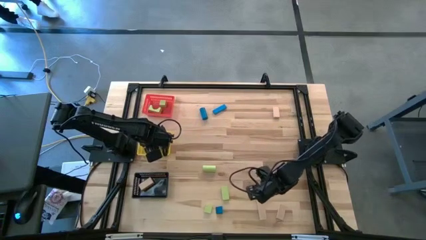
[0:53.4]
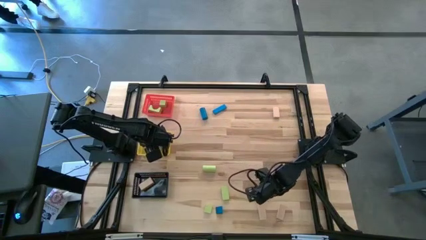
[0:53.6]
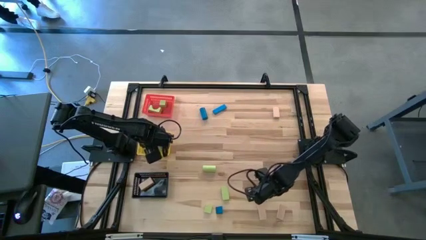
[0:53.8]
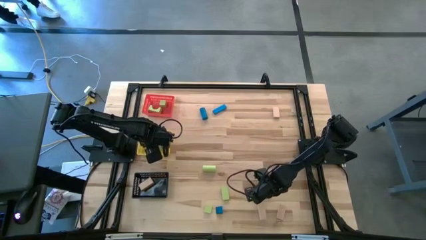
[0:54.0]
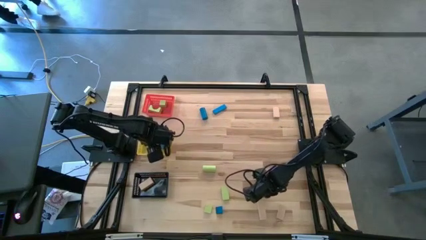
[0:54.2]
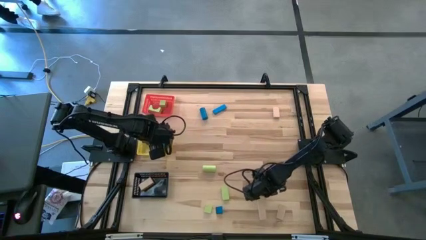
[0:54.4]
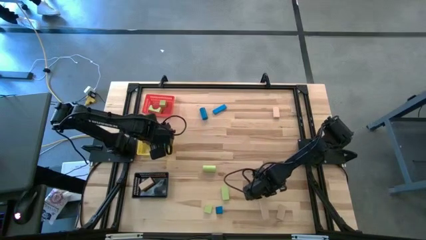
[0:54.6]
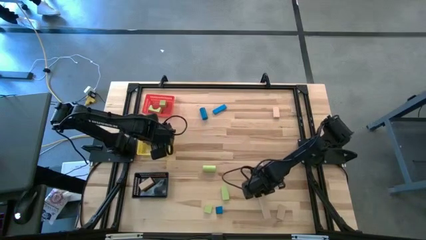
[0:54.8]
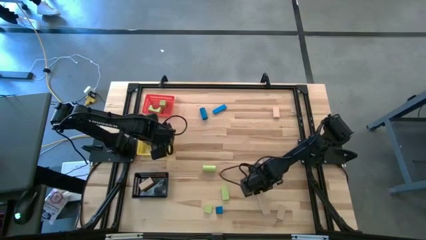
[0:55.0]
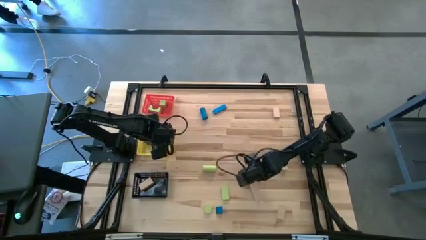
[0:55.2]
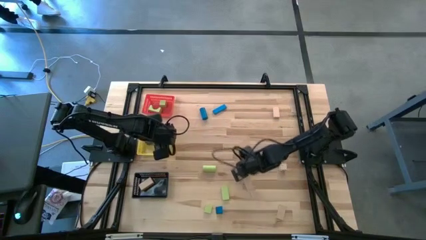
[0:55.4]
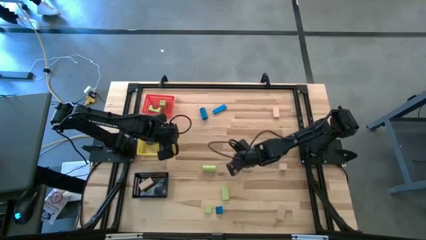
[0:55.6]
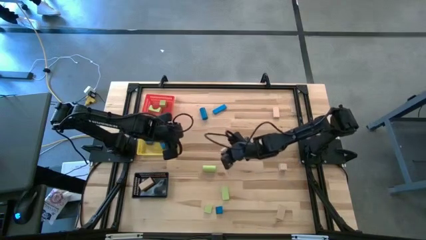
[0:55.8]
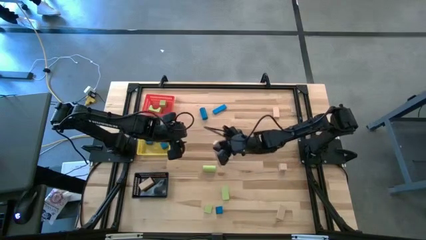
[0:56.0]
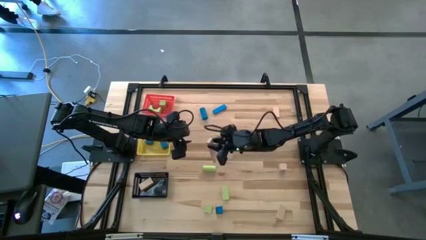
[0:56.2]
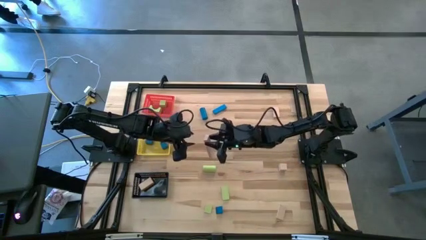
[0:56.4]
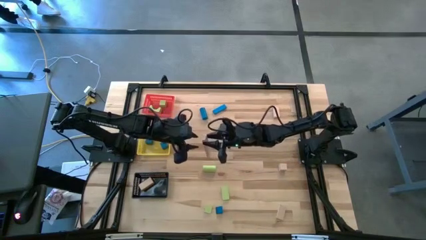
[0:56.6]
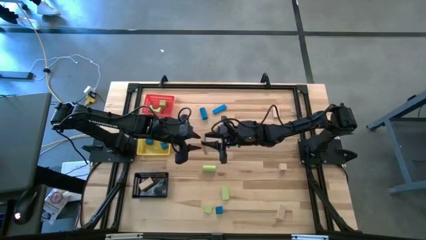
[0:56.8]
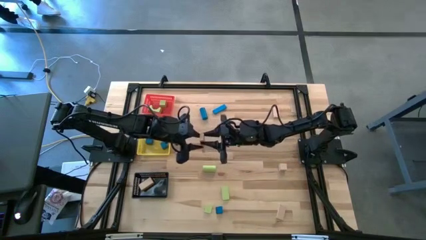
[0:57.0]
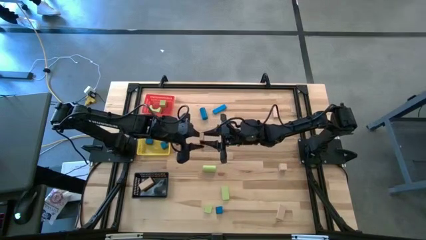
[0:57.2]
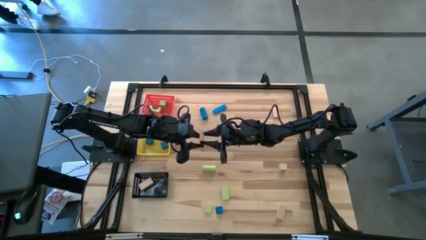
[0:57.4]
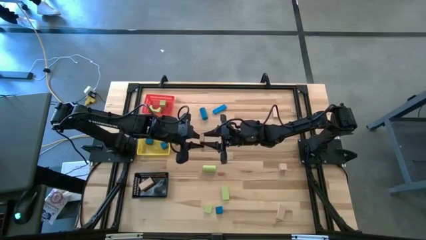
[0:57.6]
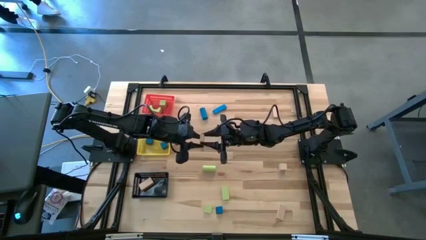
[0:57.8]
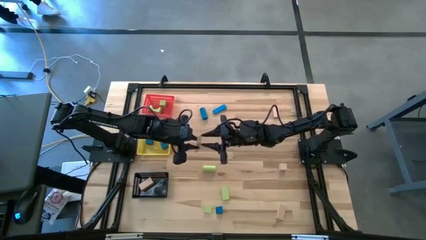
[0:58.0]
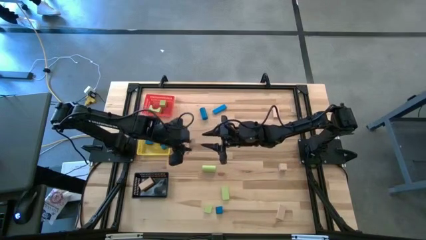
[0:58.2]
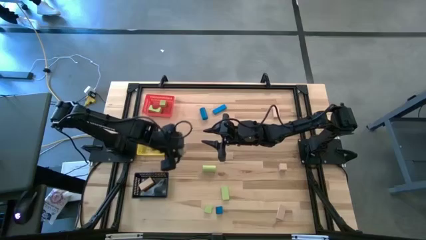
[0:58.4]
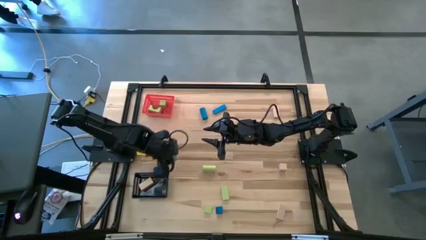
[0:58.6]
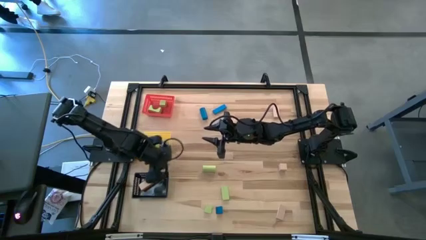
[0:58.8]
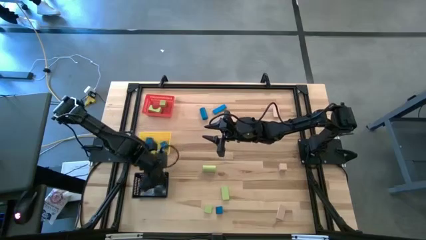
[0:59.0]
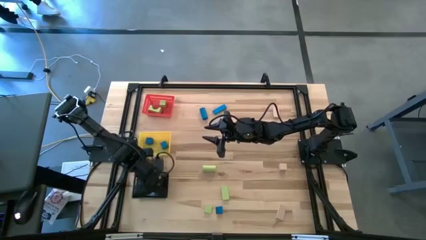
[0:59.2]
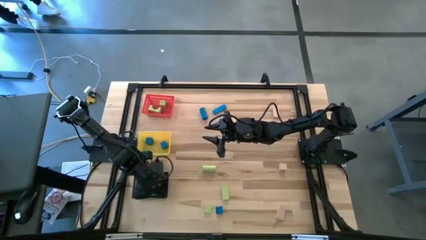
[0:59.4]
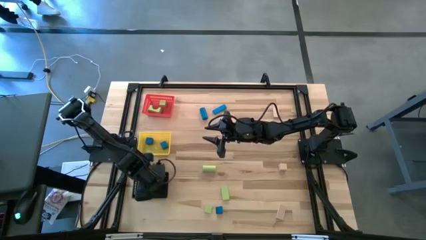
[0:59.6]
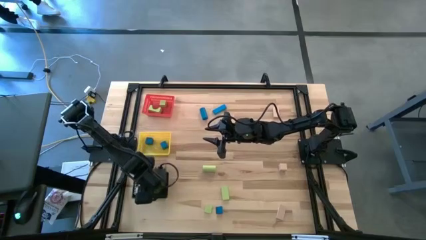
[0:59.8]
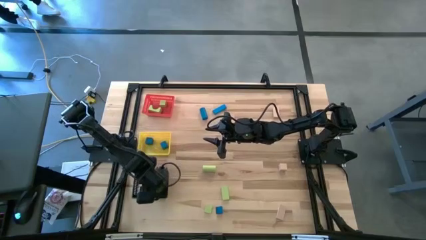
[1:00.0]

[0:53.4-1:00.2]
Task: Sort & place blocks by color
Put the big rectangular wooden block into the black basket

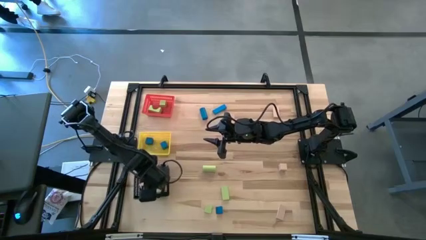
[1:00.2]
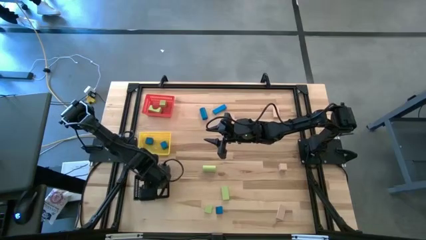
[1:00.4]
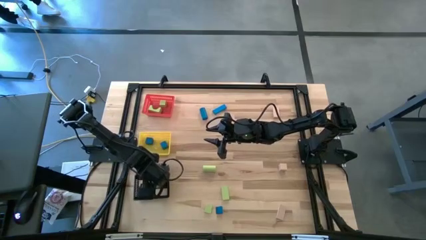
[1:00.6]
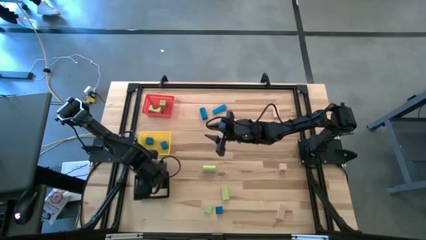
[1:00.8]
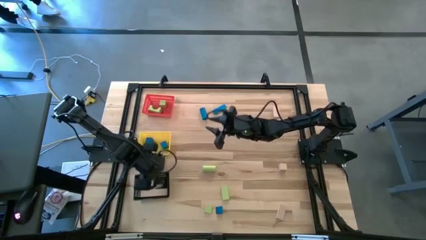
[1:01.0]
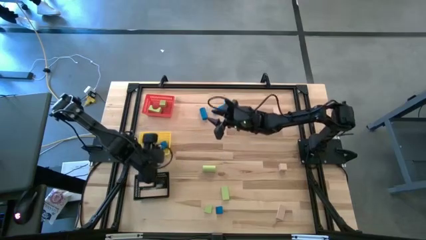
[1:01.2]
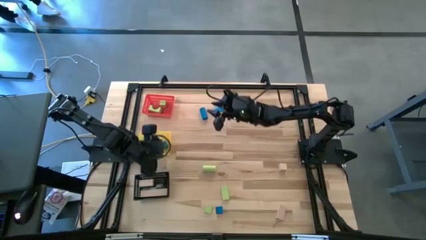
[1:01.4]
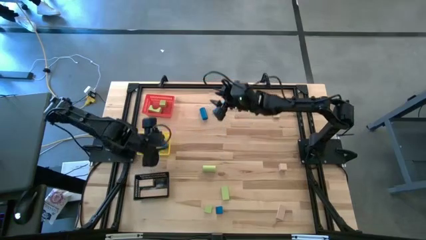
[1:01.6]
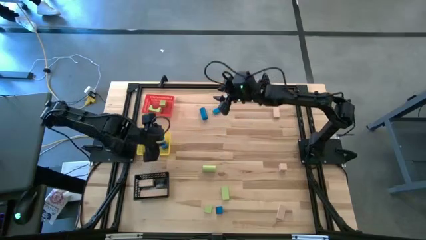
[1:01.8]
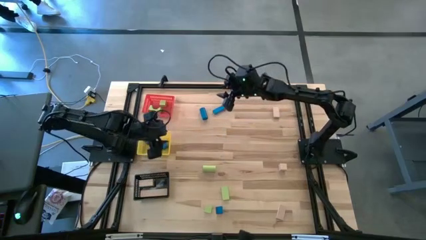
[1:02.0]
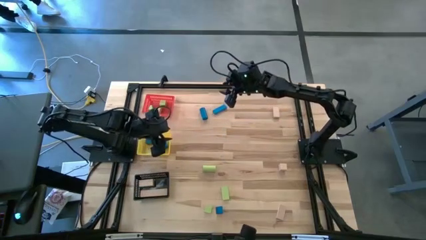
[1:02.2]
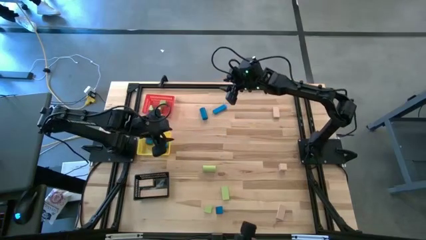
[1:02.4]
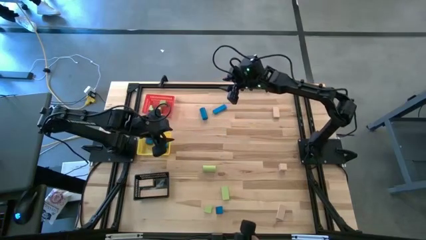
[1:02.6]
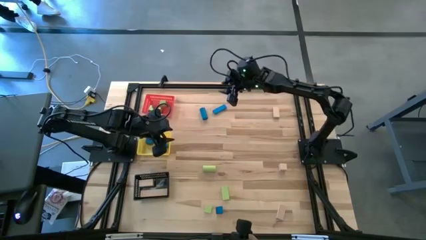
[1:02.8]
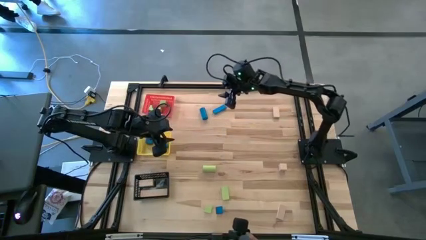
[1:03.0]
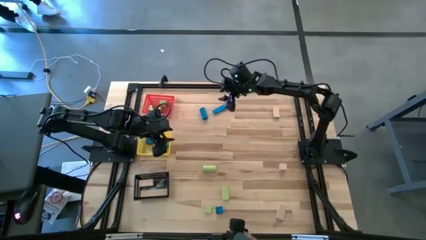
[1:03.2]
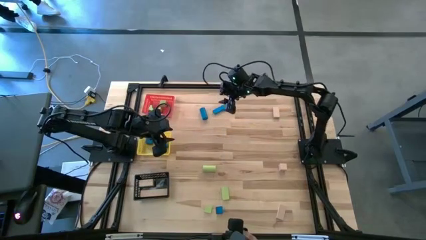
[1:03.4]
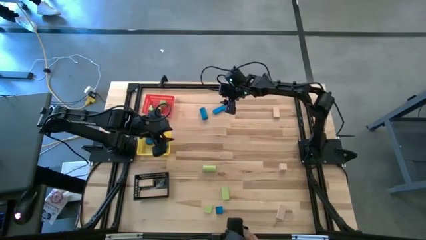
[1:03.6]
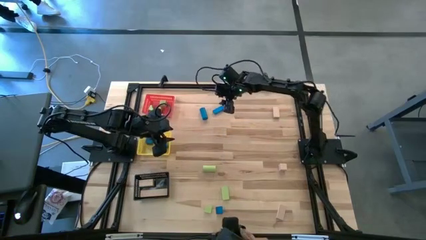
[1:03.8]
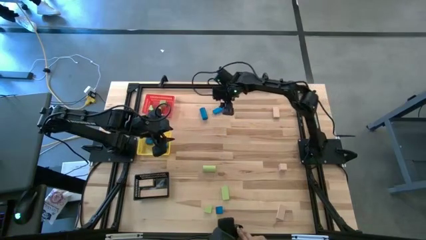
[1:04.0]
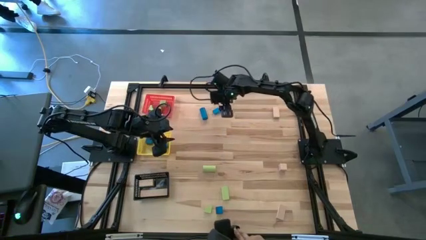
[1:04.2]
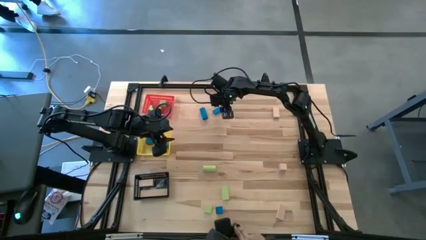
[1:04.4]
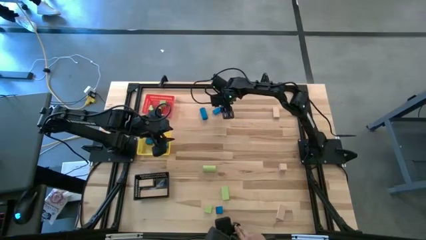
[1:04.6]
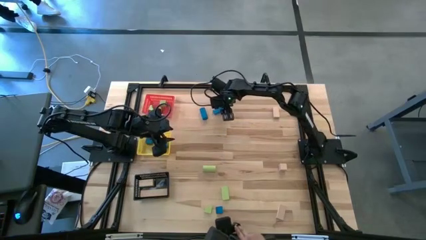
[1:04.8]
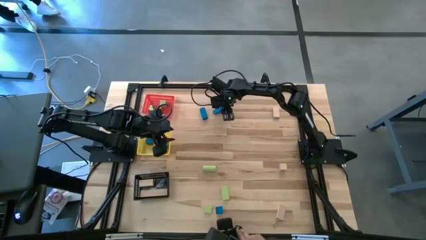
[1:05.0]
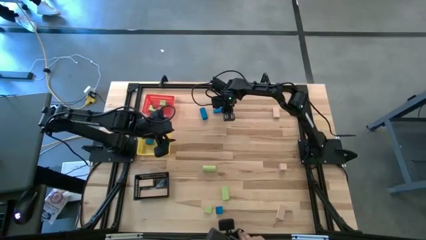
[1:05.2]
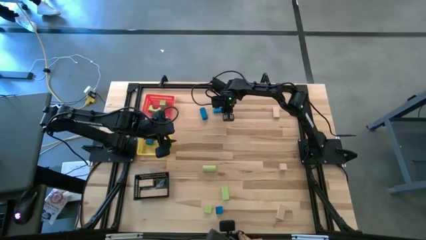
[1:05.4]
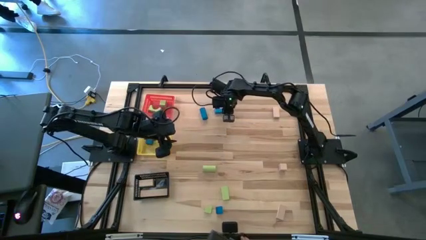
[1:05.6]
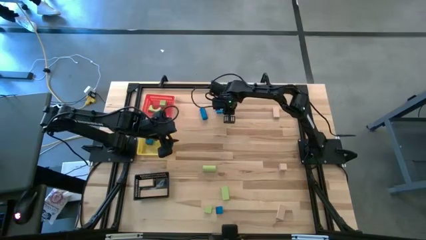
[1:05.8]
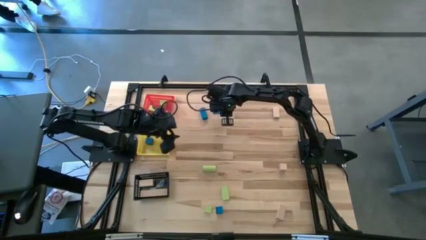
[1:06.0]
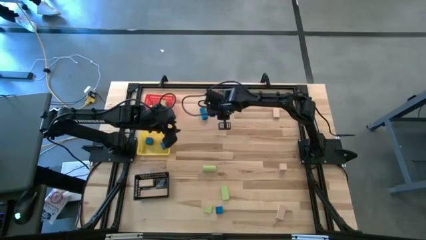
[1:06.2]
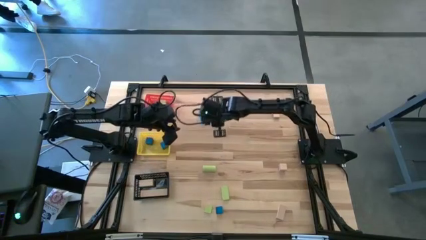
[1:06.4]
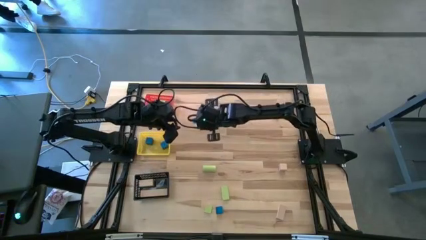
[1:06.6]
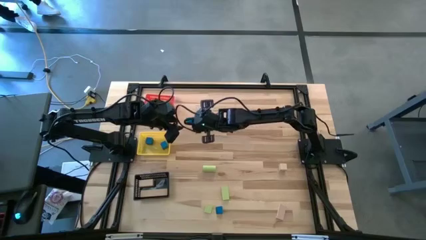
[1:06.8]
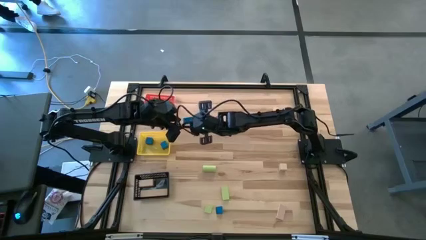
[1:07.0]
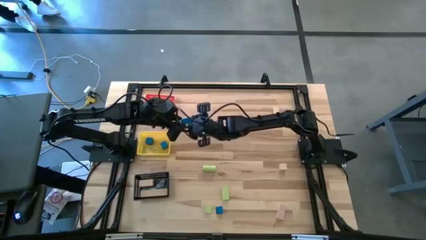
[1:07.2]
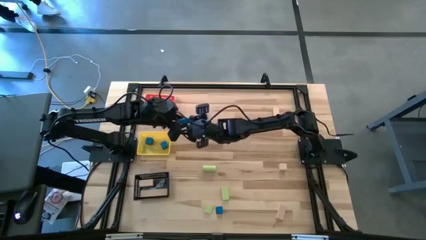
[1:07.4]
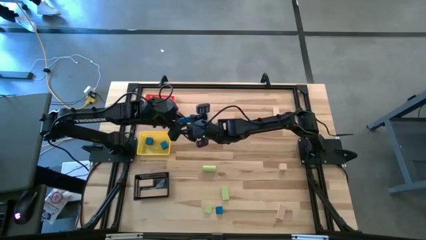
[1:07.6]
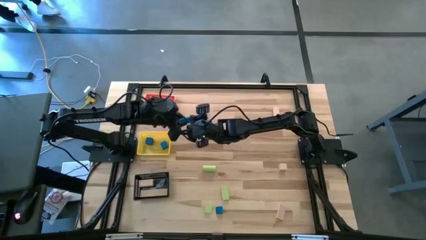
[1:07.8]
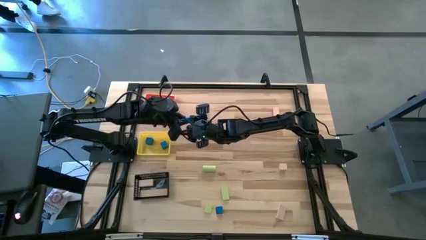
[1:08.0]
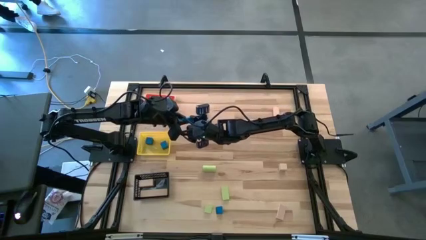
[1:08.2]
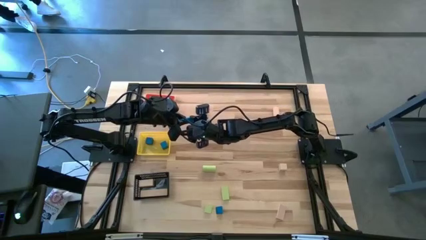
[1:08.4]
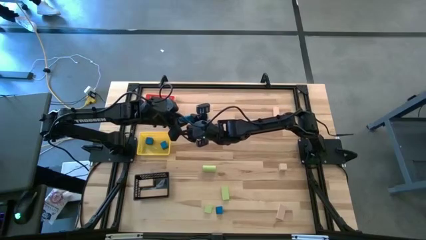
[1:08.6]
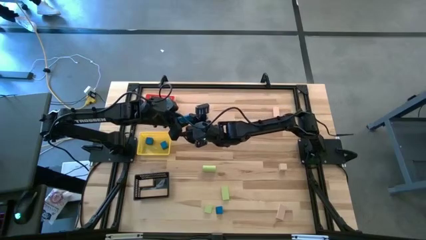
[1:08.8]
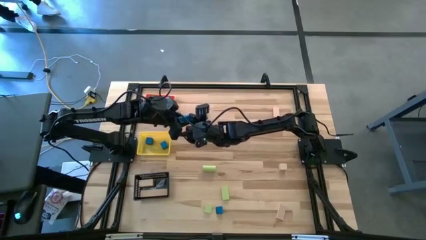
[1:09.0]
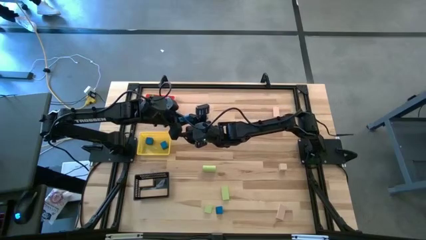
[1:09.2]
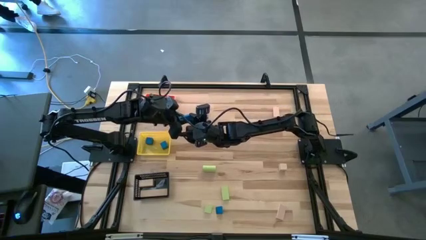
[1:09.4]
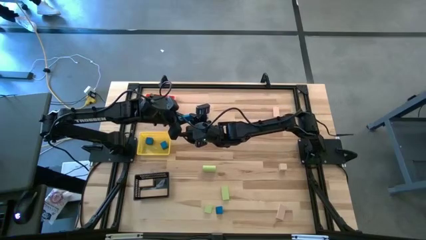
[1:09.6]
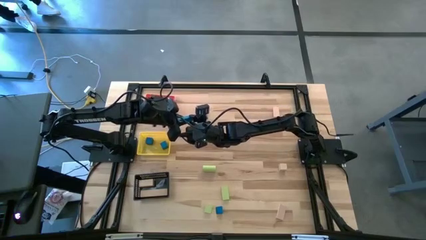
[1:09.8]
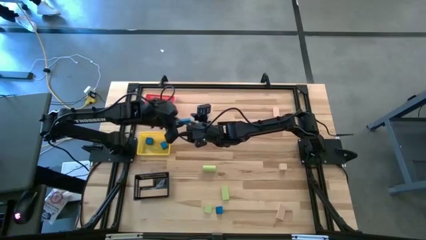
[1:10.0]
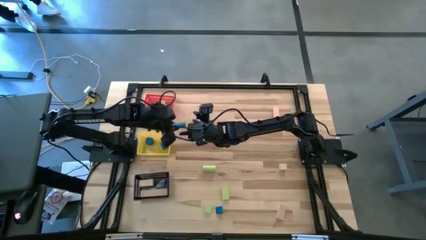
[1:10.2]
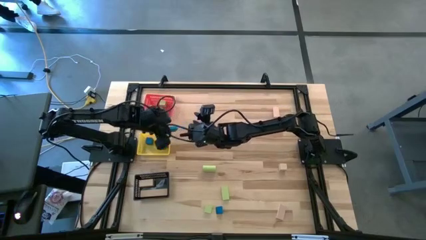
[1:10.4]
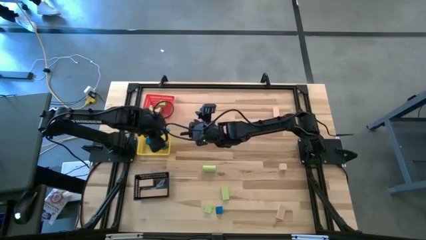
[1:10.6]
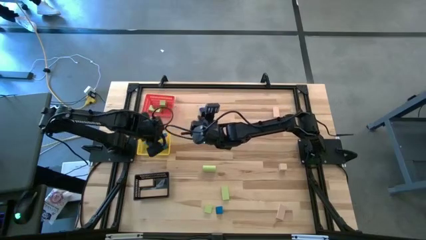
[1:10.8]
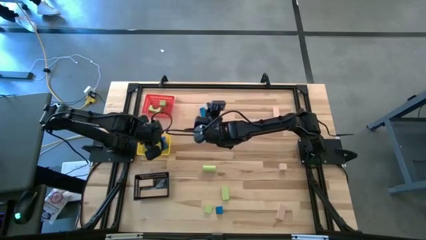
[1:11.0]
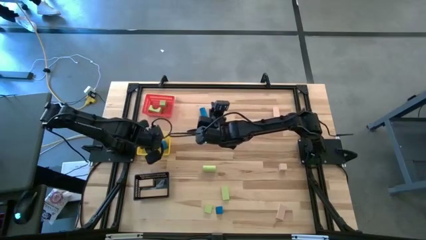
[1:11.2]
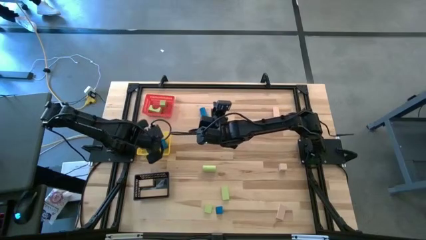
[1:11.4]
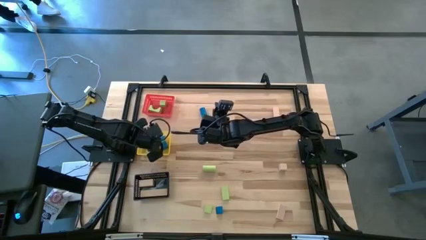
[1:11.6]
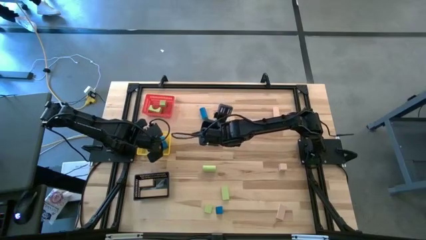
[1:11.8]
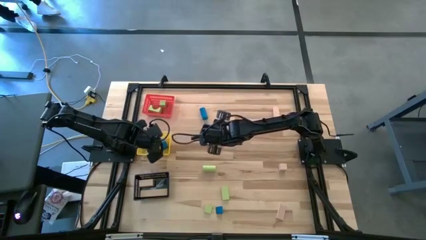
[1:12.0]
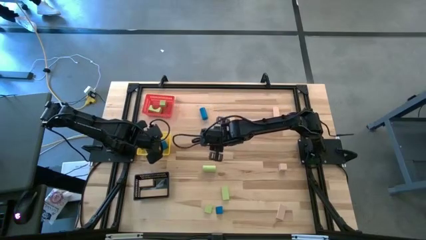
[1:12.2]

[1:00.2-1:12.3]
Put the rectangular blue block into the yellow basket
